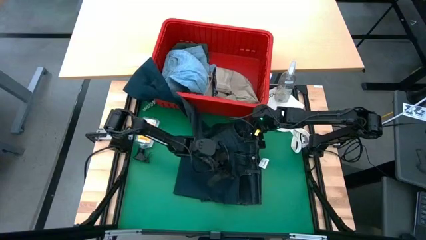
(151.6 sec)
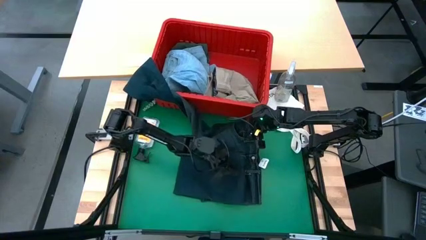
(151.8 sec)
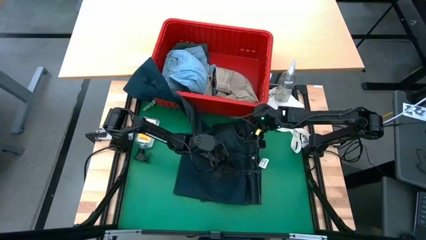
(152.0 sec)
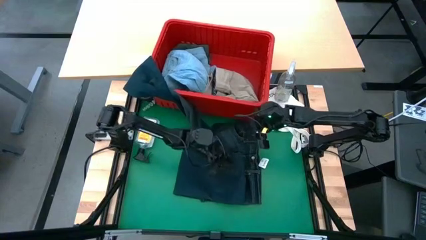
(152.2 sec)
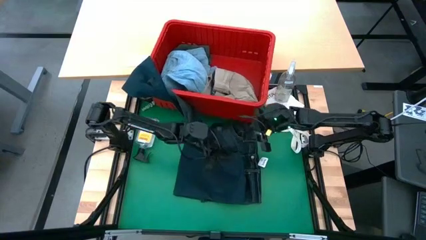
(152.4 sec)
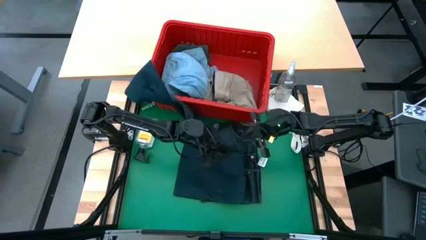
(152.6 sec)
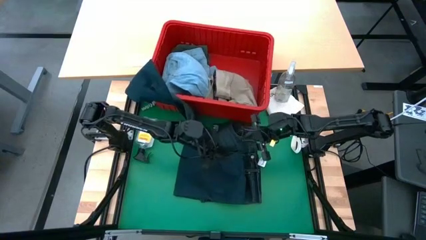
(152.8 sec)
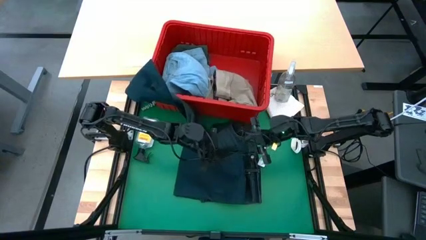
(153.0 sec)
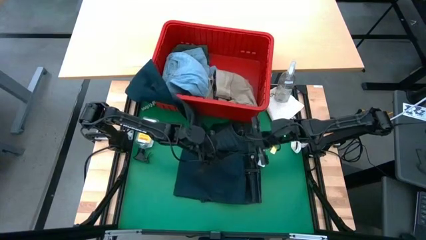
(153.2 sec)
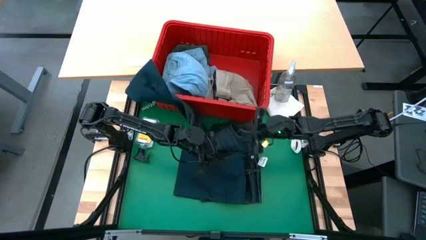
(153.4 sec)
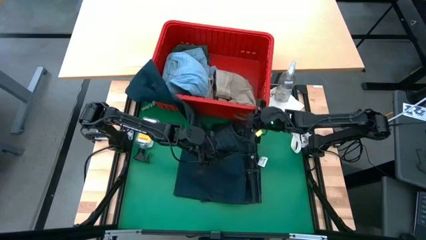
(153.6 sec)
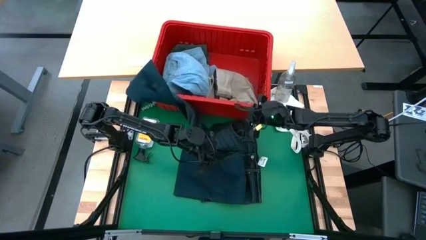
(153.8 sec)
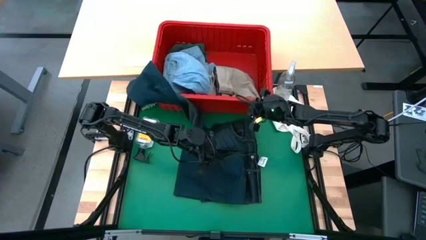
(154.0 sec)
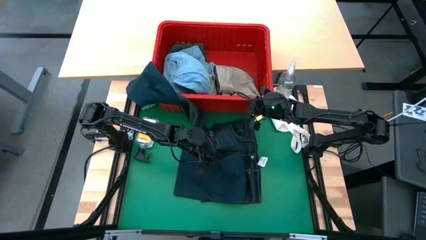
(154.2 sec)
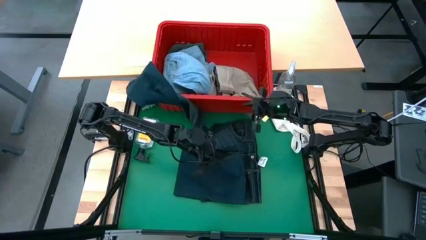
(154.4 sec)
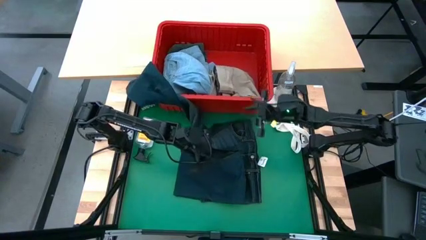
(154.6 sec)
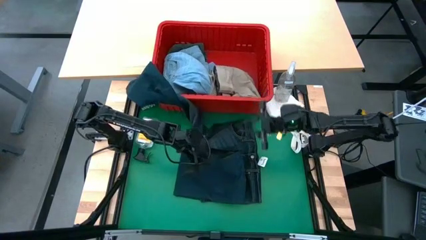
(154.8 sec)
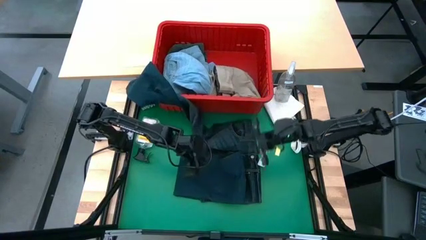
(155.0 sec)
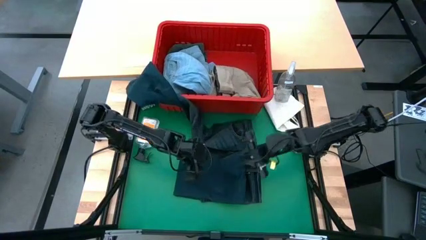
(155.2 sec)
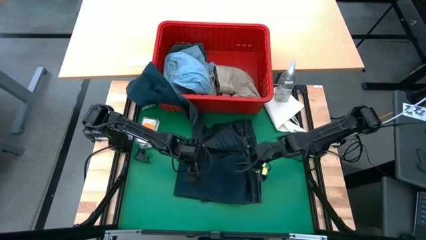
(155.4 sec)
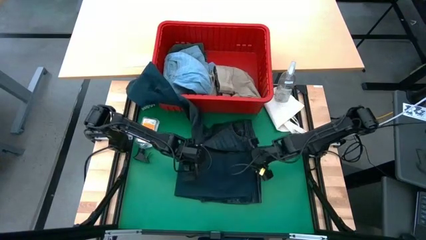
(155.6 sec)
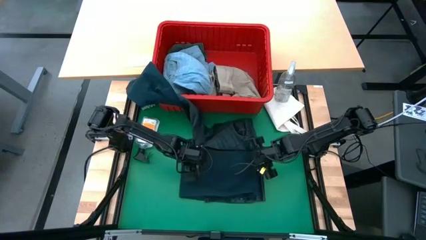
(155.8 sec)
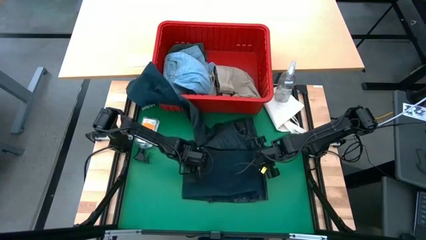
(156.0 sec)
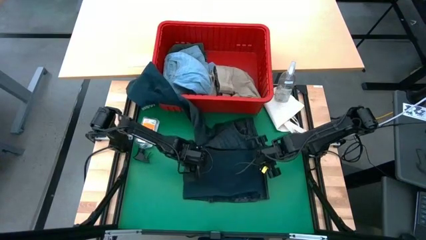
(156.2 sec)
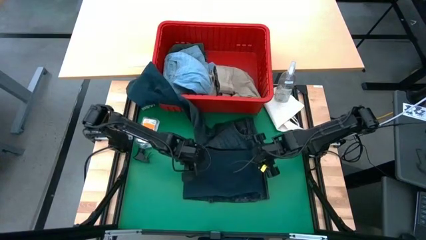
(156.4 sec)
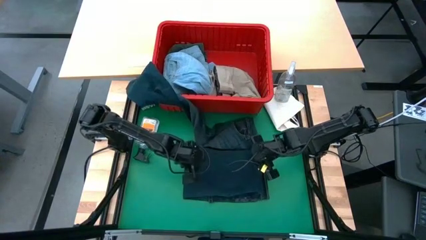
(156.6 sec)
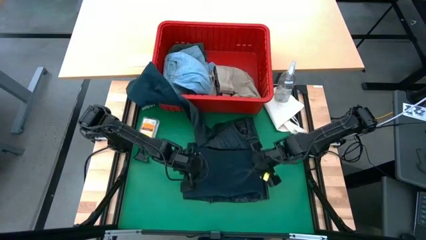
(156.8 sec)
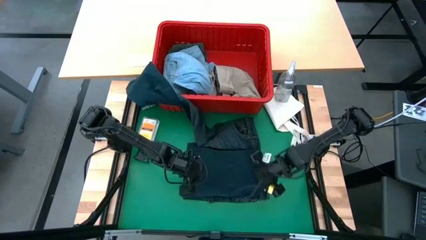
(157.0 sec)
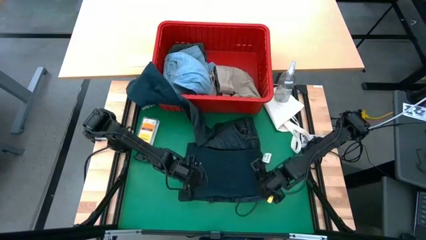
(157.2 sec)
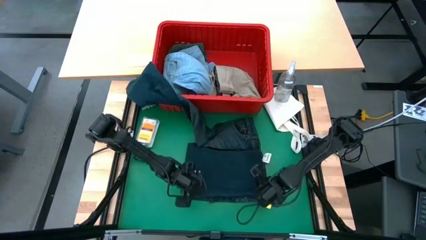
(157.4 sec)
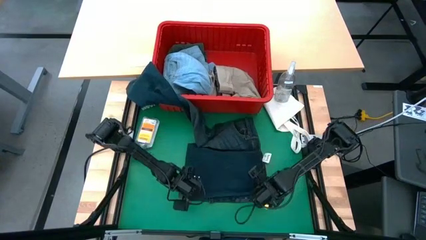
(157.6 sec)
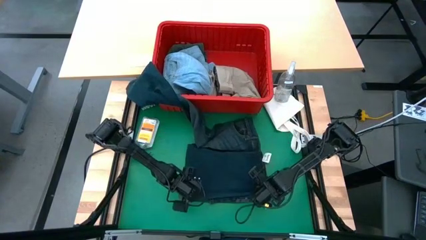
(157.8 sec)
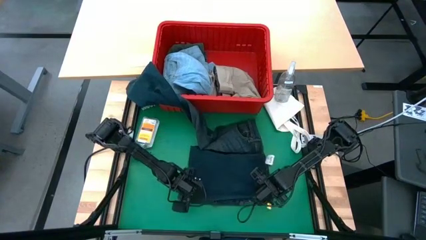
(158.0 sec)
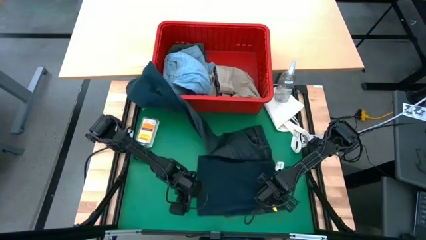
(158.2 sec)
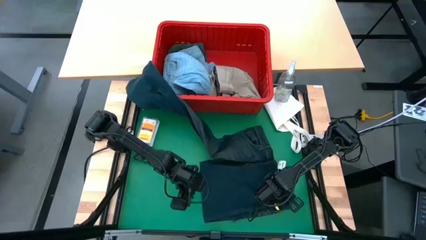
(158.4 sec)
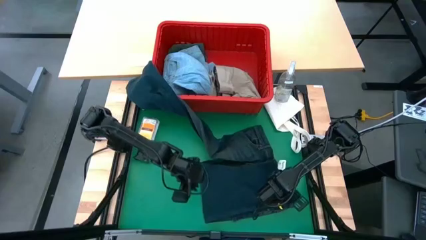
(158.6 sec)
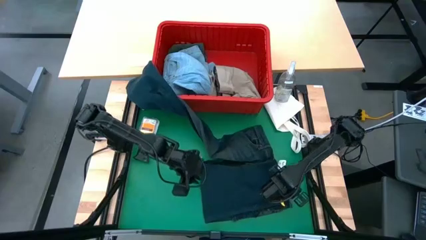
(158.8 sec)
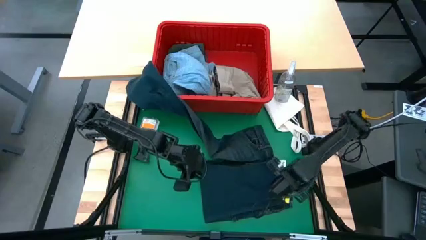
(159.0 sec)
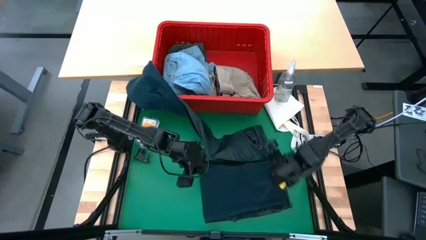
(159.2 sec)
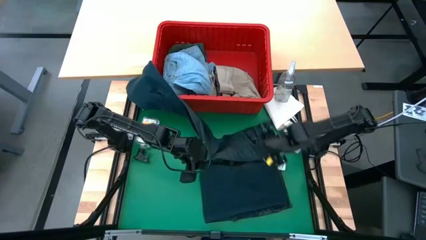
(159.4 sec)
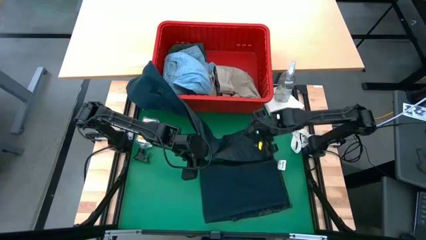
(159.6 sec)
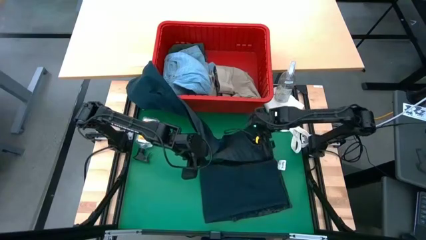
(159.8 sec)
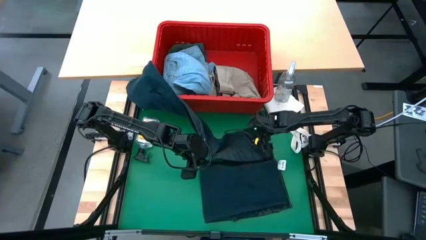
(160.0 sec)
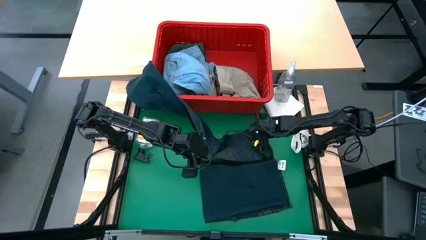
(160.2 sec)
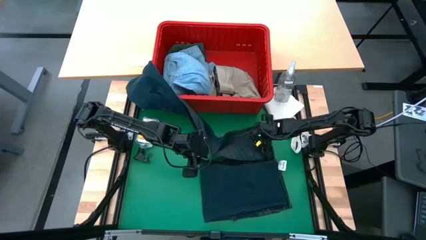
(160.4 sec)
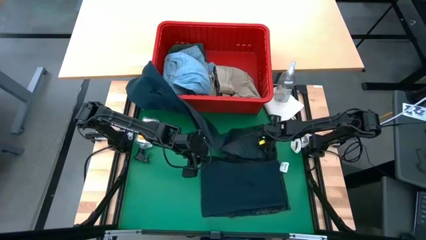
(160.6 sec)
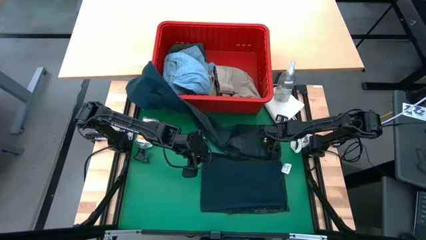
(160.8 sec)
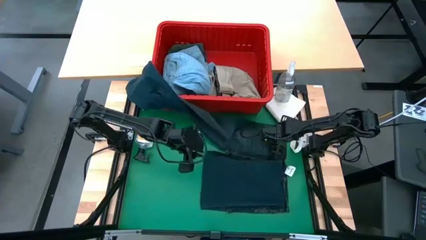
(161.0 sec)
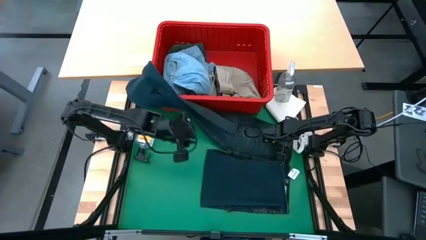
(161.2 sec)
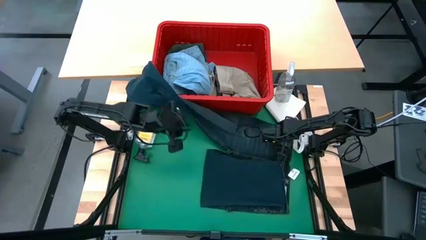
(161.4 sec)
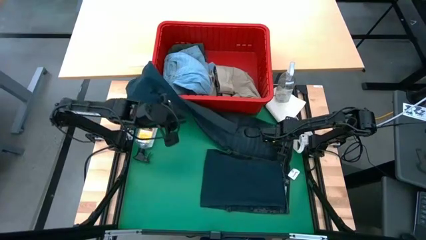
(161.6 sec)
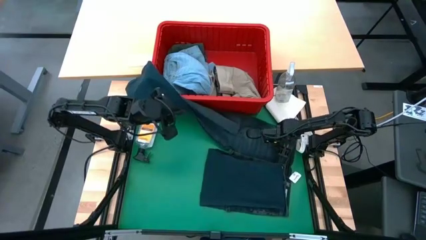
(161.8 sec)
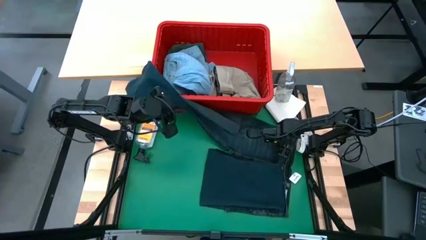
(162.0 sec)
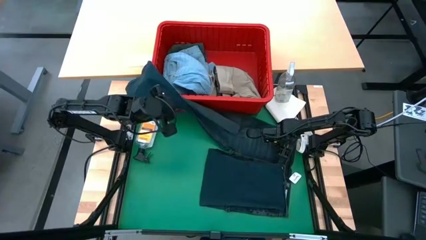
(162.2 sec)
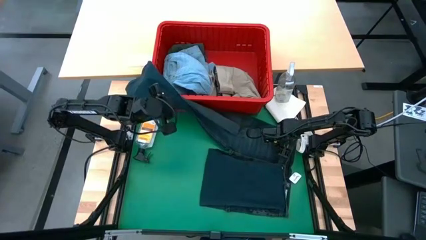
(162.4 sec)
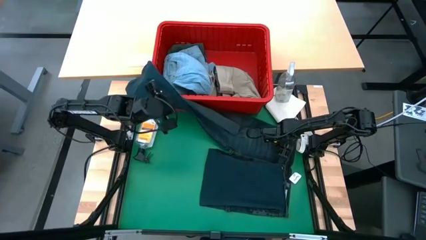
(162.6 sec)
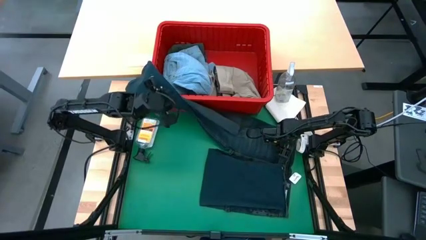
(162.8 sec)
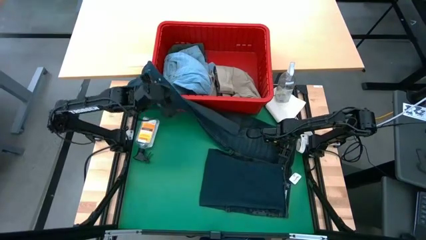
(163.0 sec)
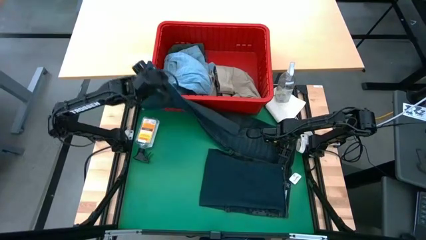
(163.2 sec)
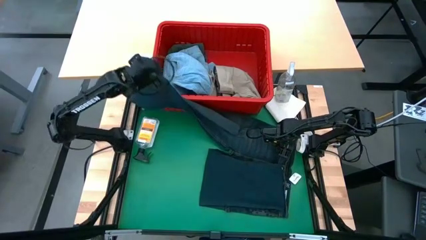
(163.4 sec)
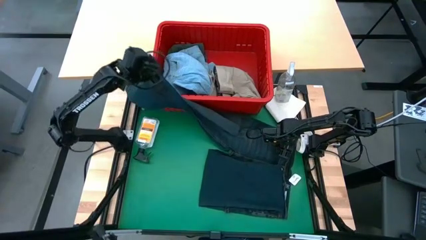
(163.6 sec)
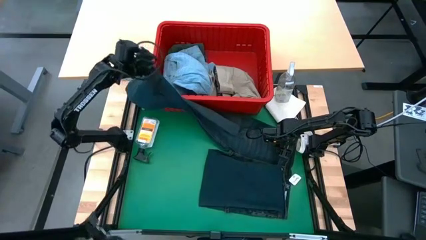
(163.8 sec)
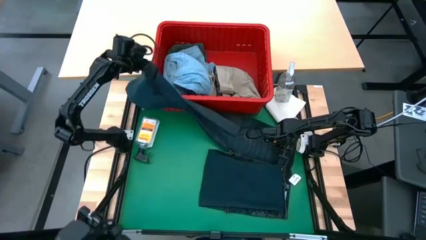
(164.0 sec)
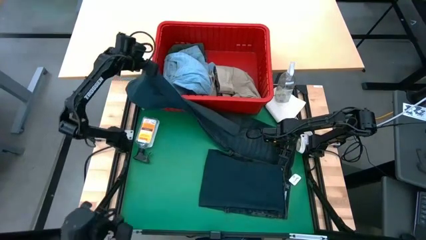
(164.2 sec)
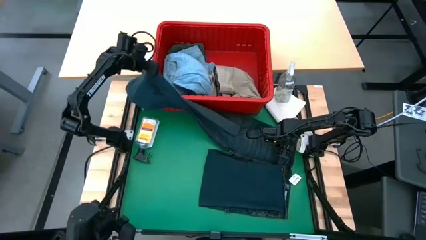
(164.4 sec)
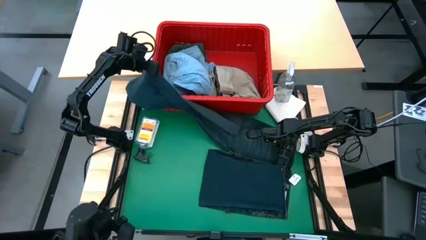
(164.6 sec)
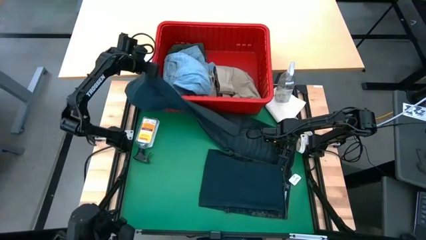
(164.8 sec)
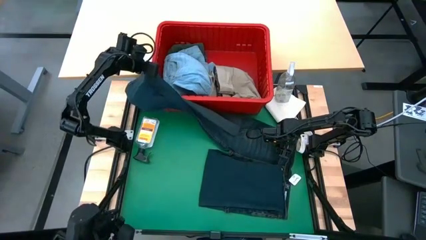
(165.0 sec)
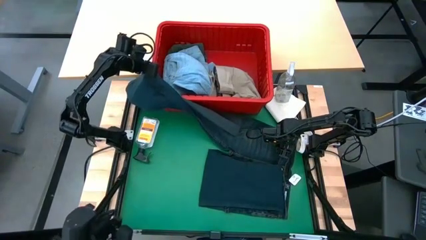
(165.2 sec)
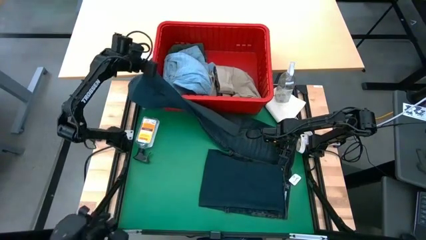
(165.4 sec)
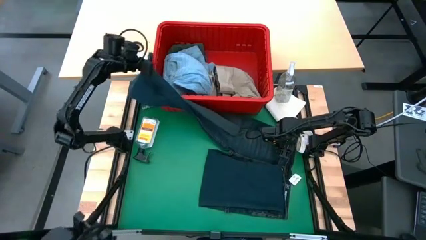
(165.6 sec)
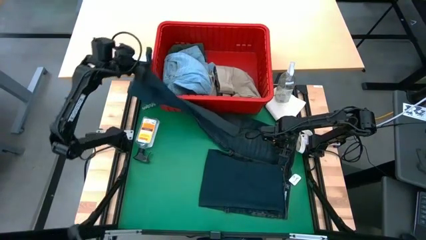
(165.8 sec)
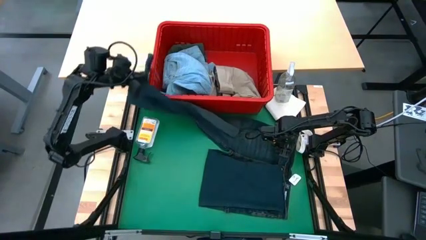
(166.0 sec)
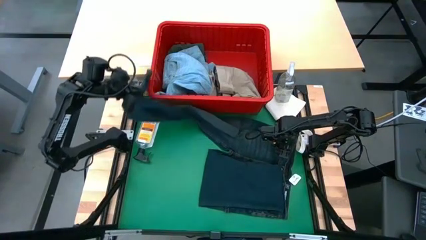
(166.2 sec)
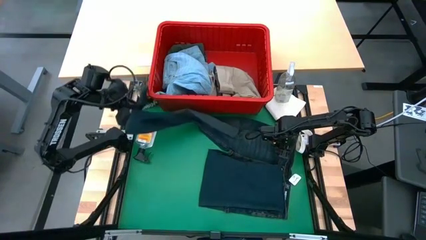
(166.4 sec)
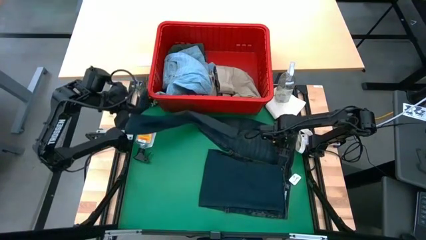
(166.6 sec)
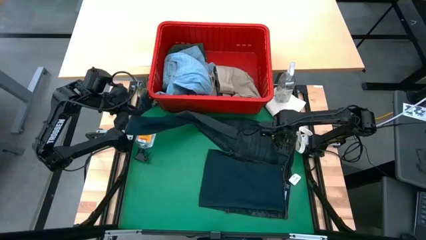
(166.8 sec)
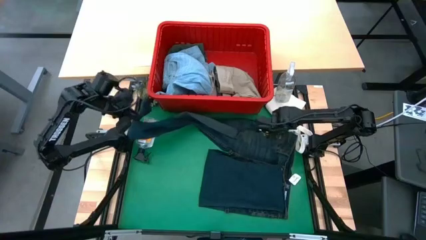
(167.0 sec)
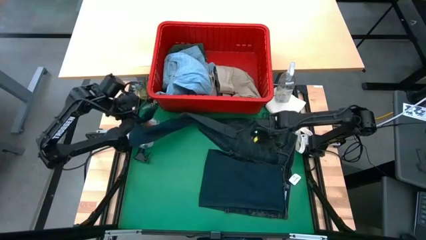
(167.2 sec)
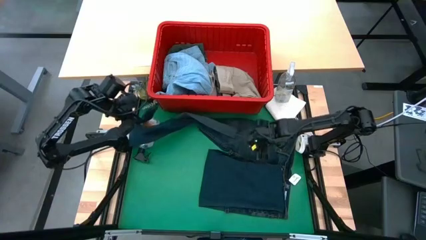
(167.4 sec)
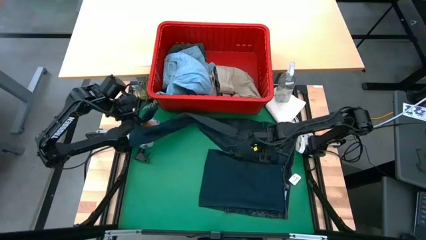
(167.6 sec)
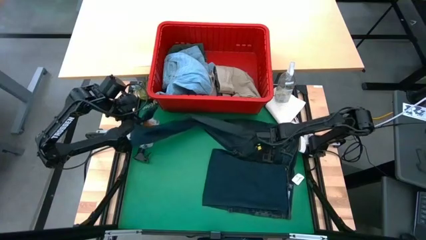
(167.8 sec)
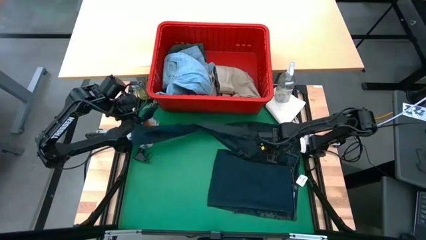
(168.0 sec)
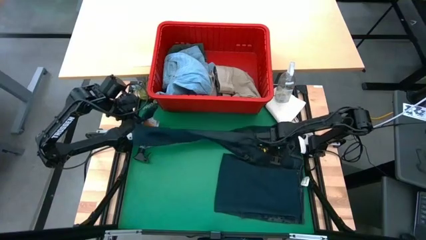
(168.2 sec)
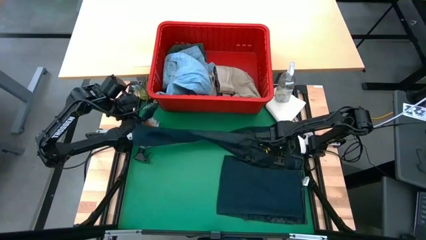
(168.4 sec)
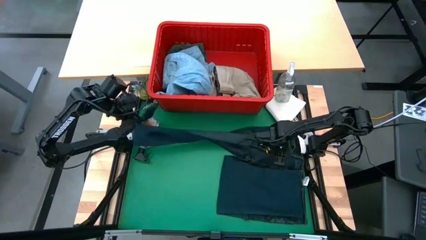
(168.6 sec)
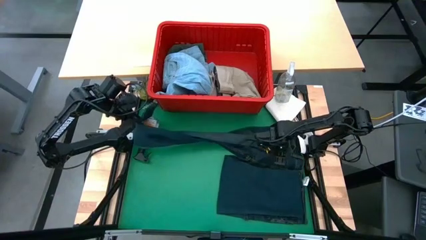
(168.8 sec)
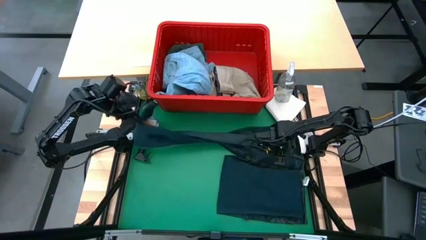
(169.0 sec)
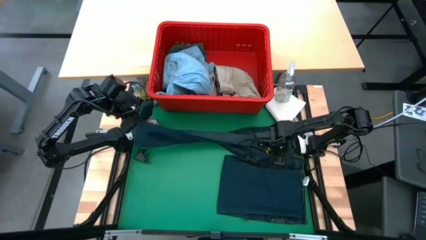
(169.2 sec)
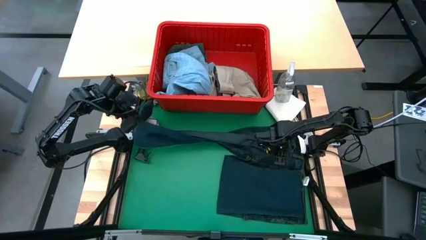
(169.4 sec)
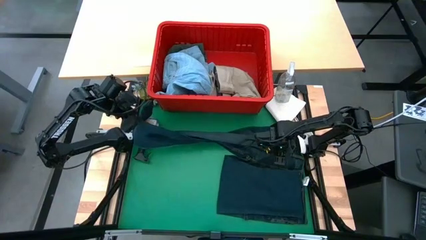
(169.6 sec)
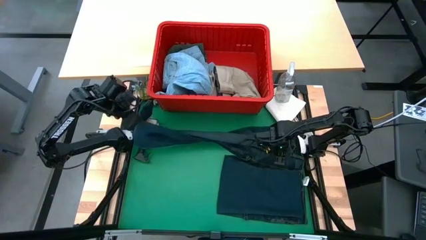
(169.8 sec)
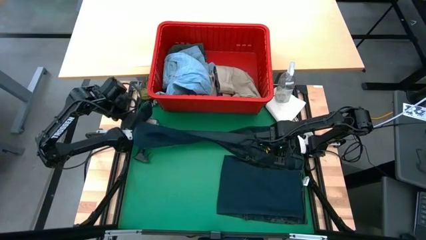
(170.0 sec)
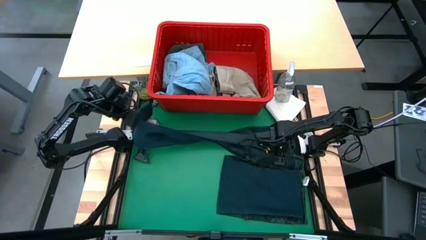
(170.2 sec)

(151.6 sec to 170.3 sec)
Task: Fold laundry
Fold the dark blue jeans
